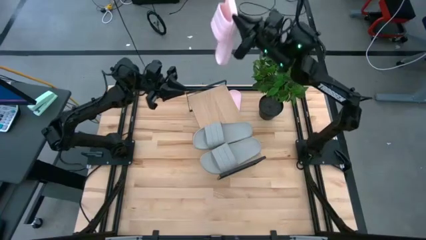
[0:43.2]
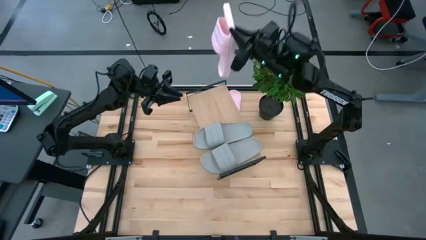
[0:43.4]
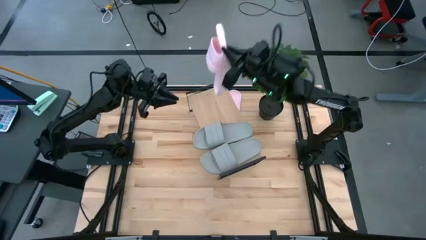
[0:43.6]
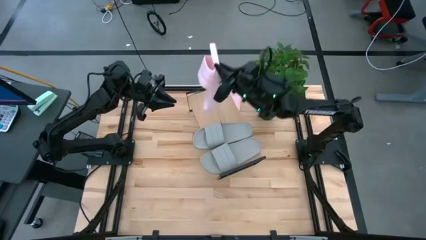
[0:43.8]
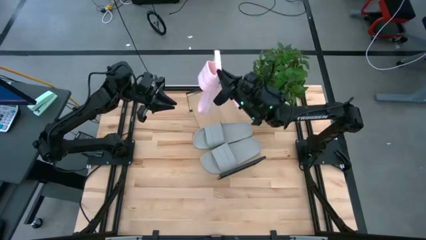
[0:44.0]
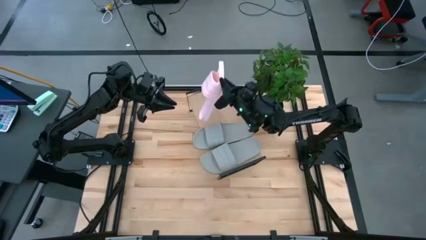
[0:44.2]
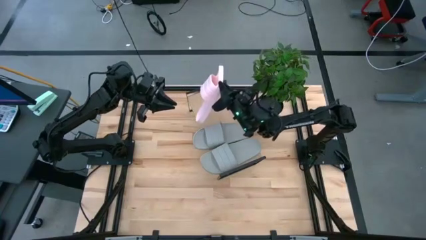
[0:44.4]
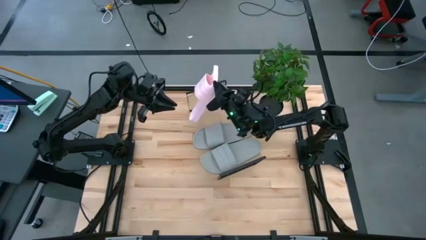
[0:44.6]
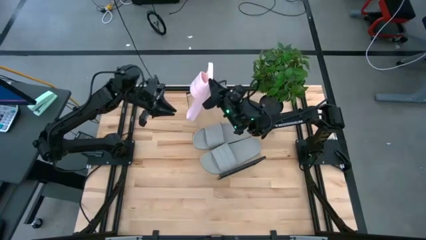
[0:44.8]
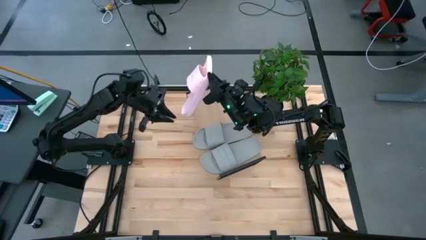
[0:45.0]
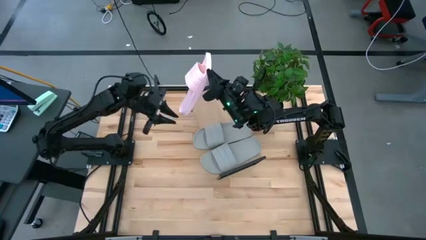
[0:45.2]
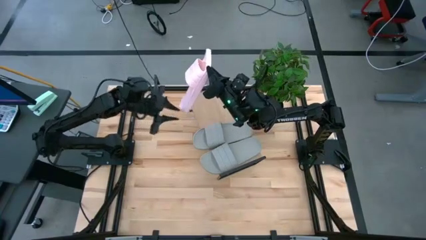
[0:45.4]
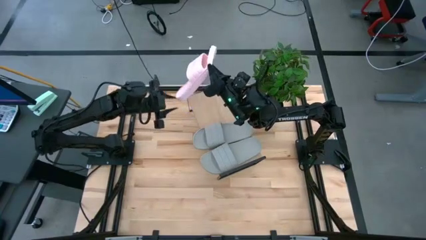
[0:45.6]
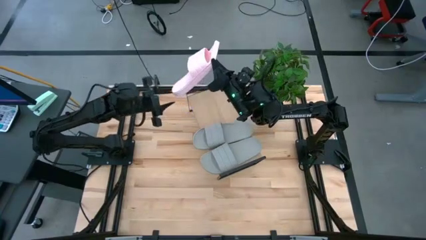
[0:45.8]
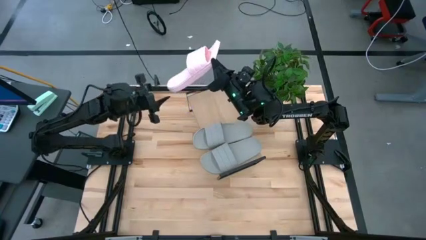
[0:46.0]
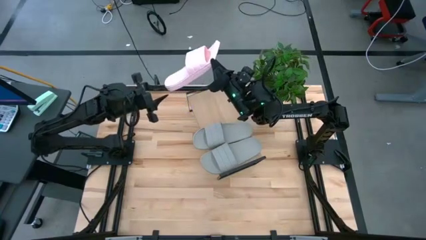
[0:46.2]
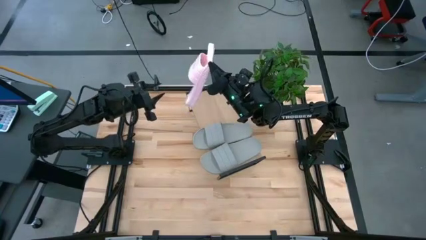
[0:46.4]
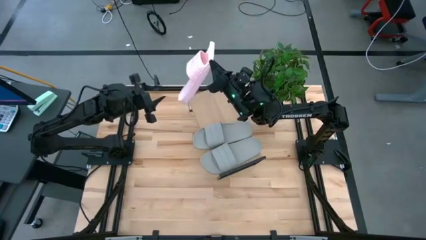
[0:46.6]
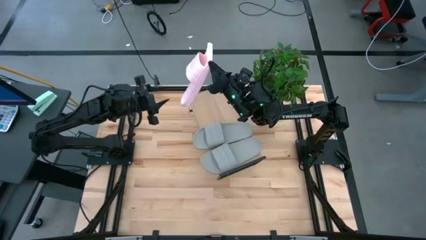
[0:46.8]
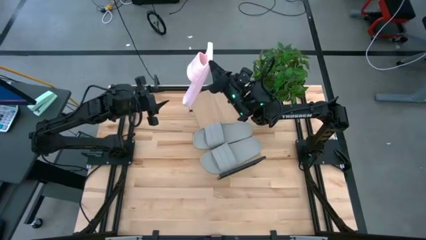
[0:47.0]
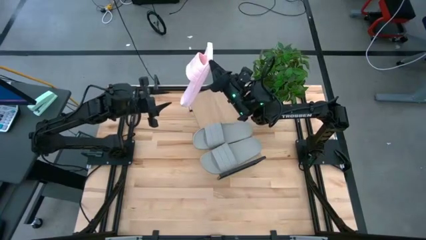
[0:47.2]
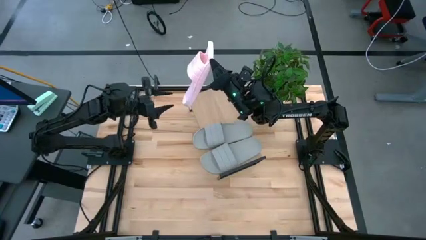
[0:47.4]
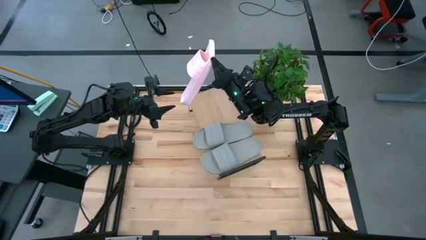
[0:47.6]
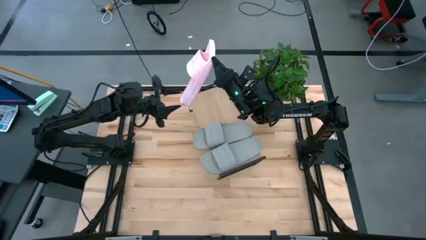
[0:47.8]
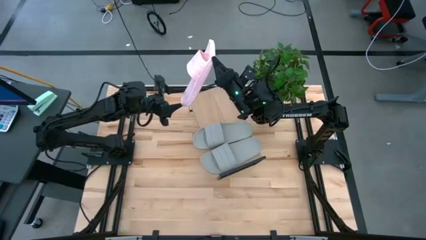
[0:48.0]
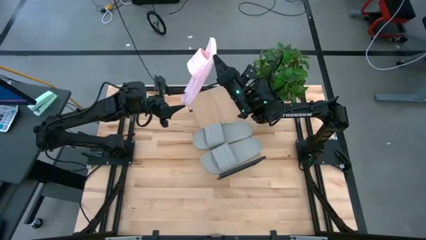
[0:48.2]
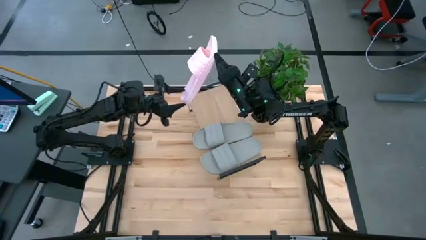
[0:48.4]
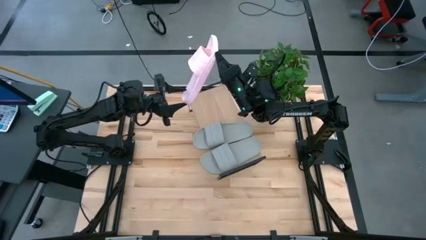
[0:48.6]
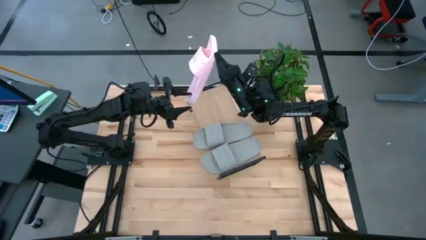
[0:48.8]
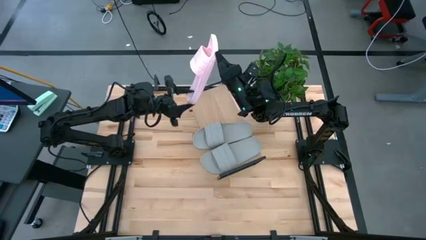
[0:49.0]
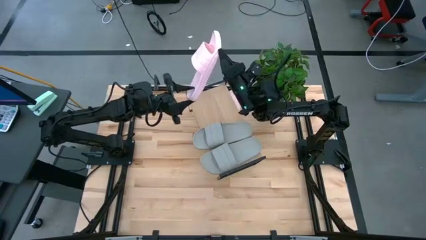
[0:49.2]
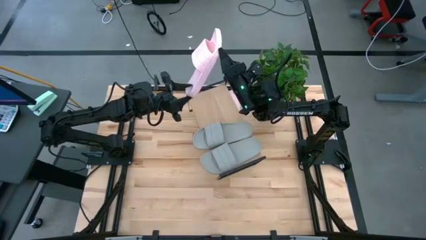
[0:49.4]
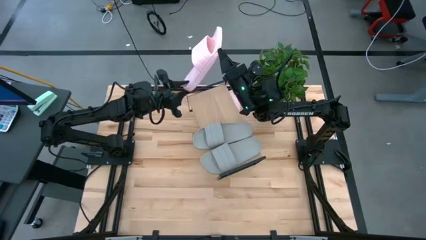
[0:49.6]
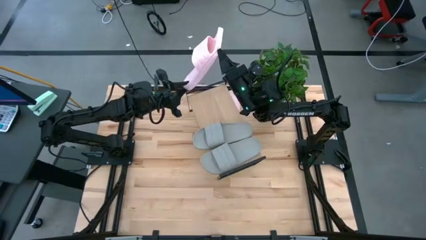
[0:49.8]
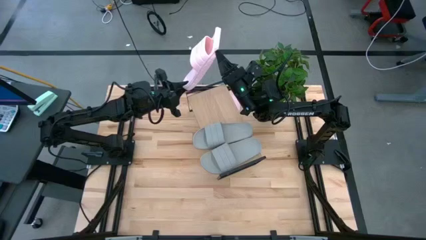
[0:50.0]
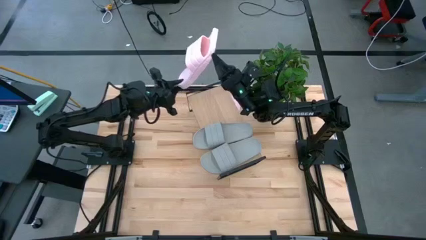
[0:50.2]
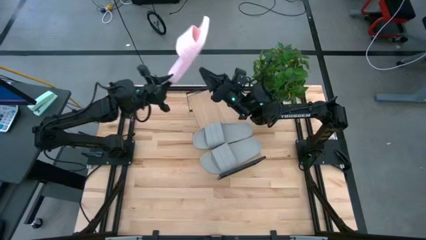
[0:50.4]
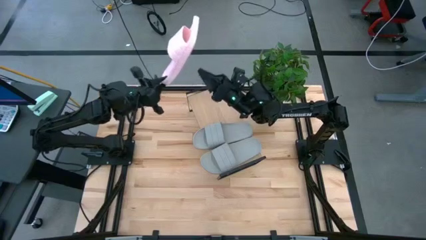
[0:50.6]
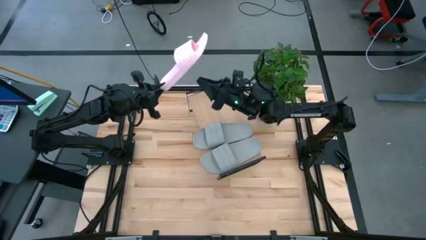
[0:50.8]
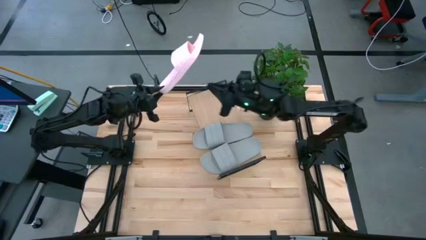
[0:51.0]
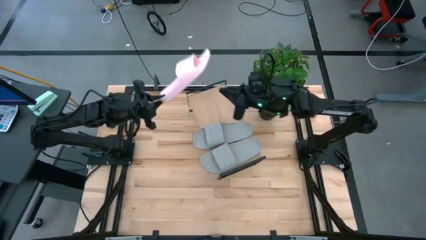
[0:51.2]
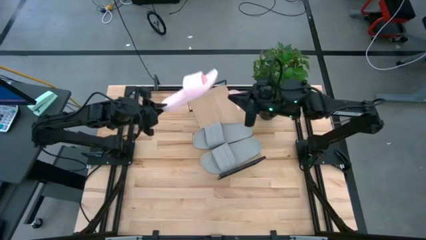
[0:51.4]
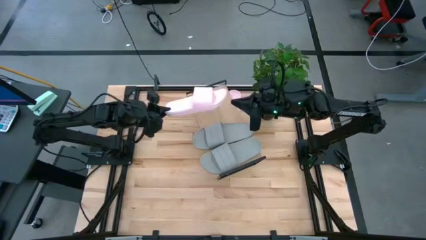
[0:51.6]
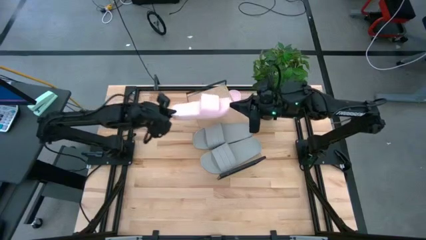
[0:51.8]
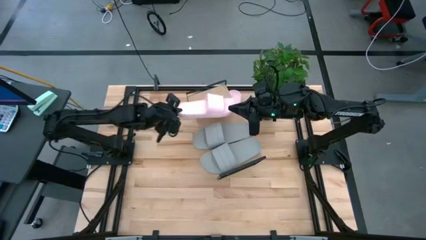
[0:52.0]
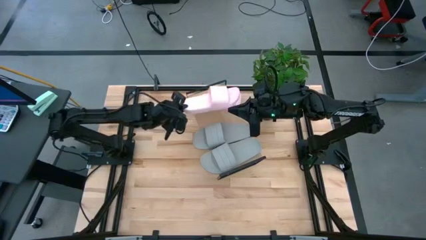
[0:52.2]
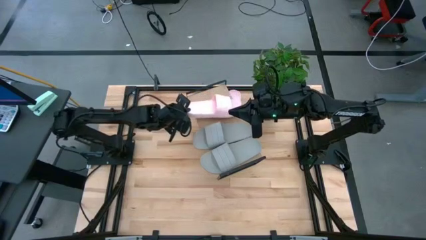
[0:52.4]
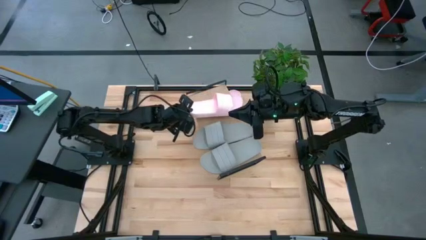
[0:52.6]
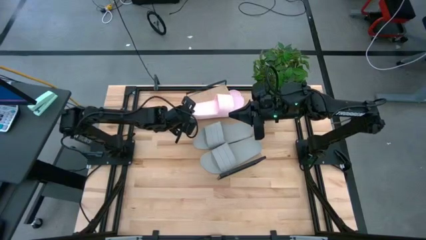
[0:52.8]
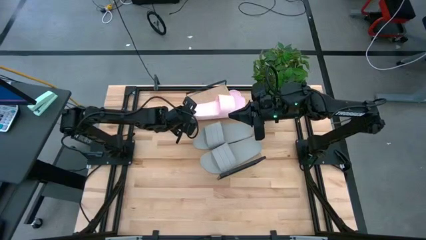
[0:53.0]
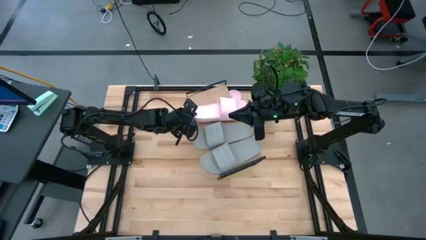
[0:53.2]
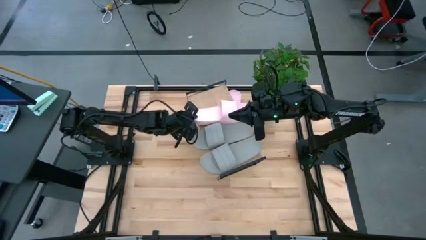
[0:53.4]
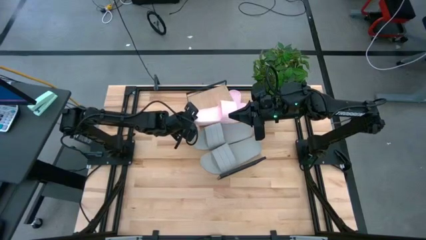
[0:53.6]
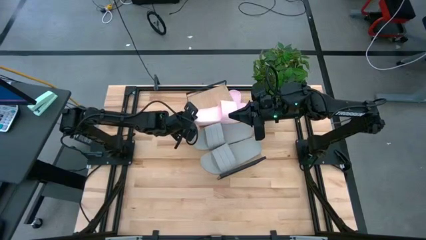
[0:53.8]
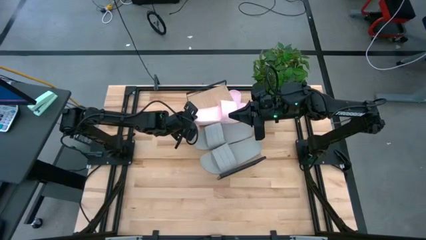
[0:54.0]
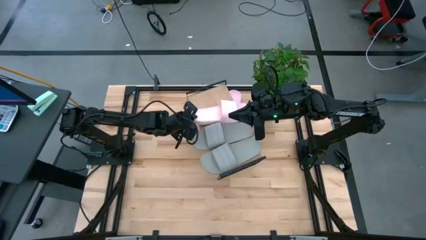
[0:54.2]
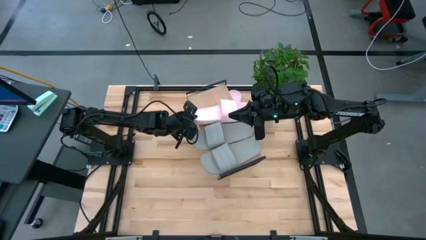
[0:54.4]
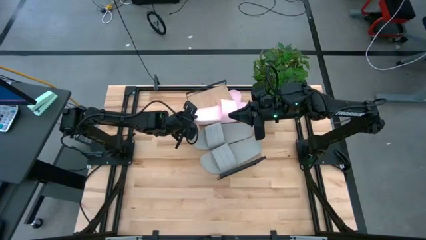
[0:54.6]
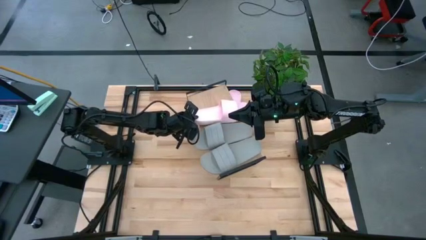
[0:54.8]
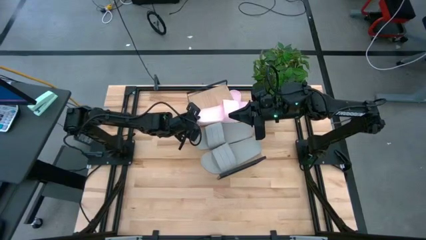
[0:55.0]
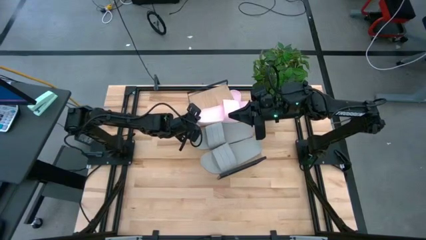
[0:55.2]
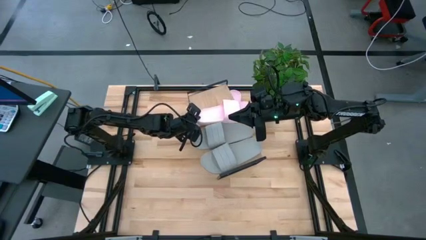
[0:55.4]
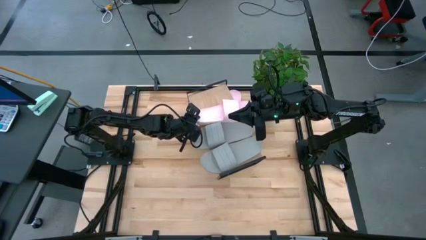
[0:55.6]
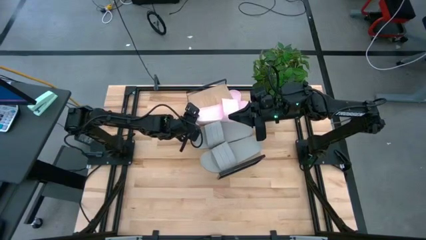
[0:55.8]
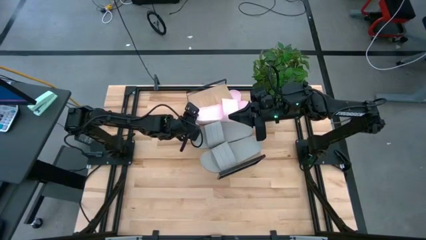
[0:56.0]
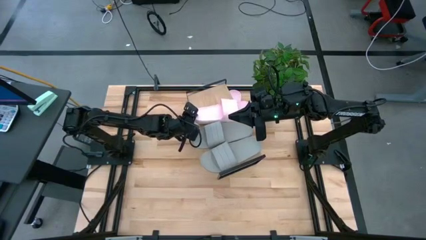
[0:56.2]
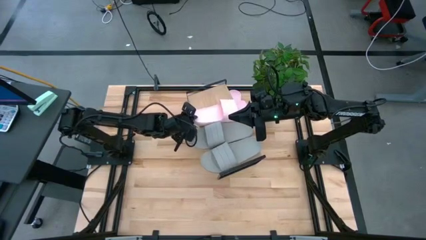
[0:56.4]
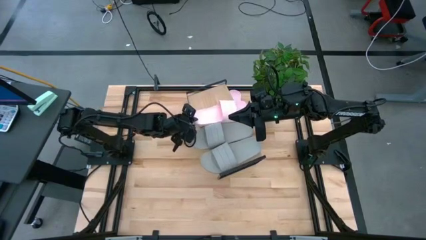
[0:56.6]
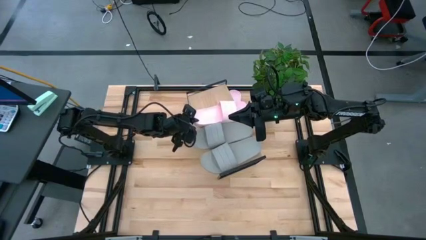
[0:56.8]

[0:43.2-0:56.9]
Task: Pick and place slides into the shelf
Put the top pink slipper on the shelf

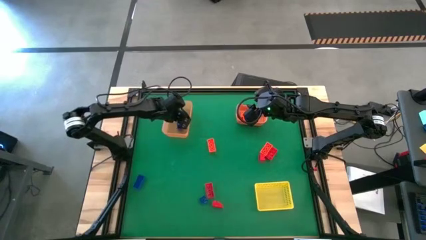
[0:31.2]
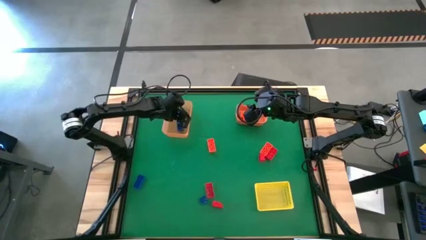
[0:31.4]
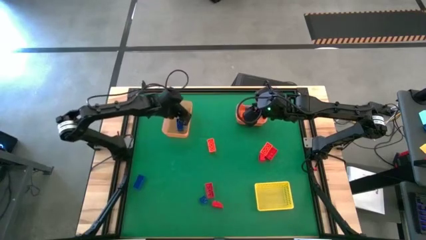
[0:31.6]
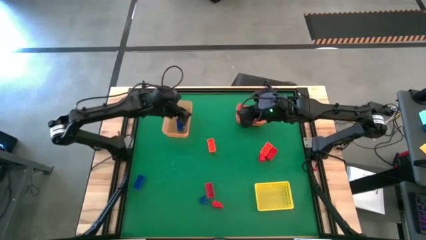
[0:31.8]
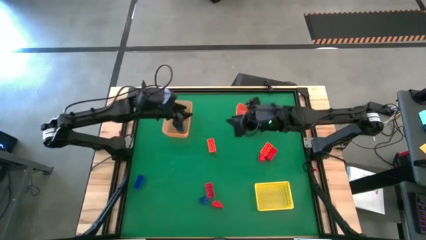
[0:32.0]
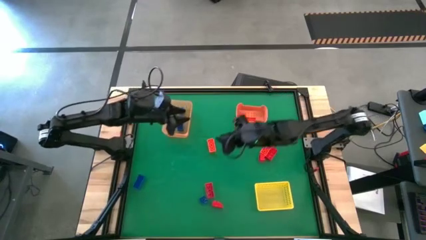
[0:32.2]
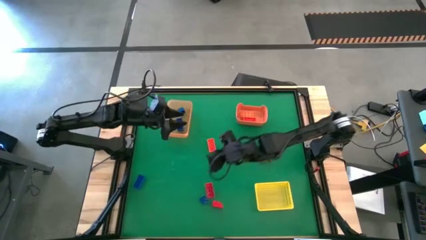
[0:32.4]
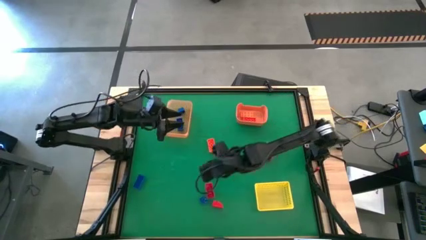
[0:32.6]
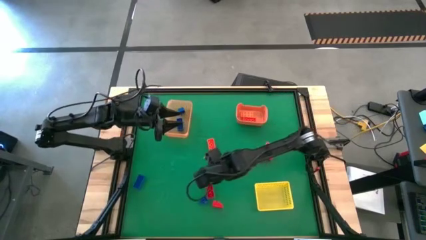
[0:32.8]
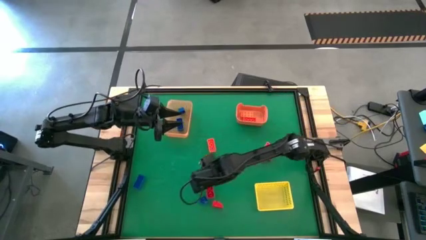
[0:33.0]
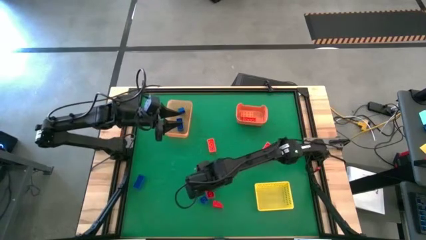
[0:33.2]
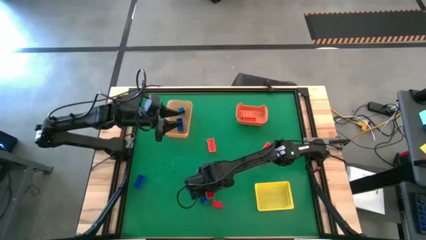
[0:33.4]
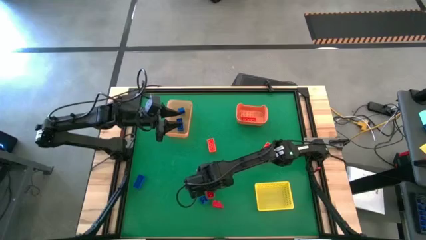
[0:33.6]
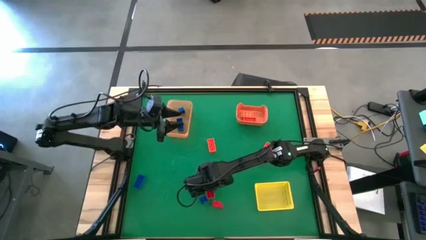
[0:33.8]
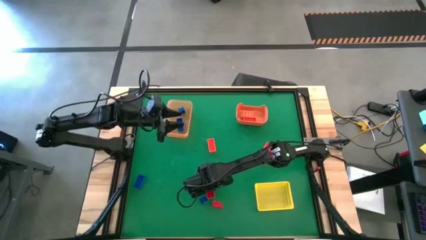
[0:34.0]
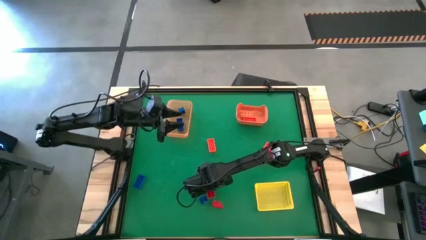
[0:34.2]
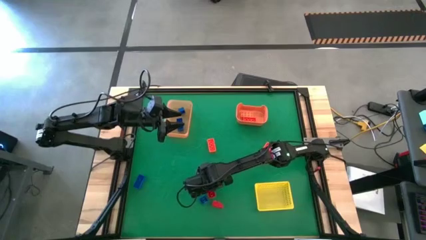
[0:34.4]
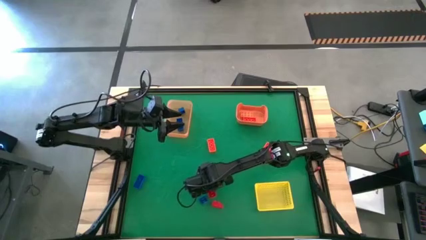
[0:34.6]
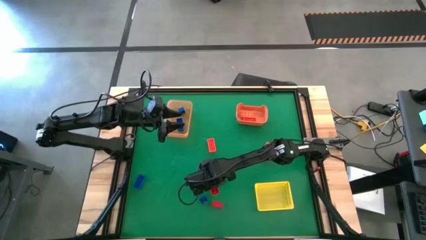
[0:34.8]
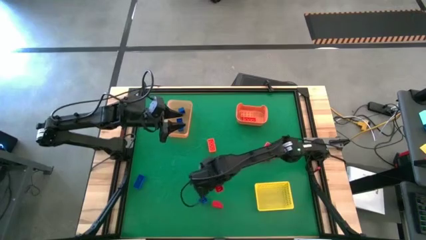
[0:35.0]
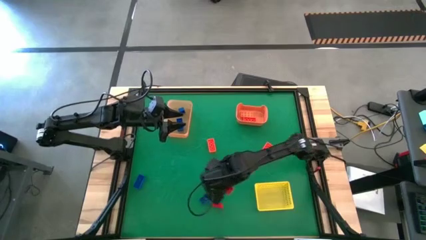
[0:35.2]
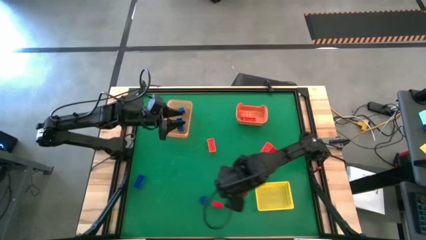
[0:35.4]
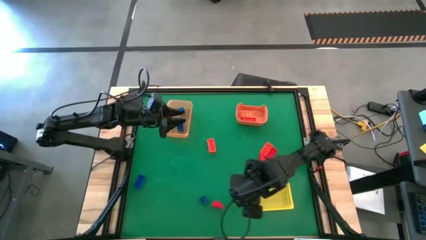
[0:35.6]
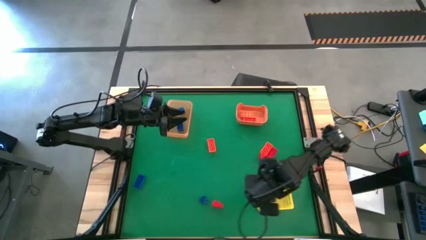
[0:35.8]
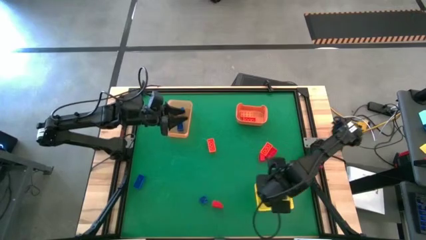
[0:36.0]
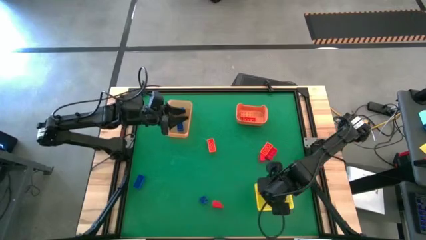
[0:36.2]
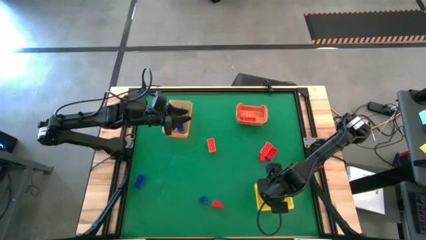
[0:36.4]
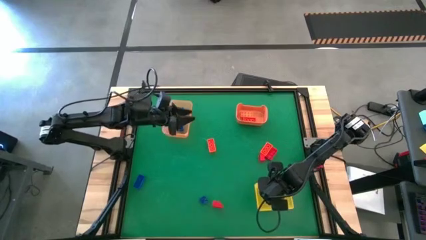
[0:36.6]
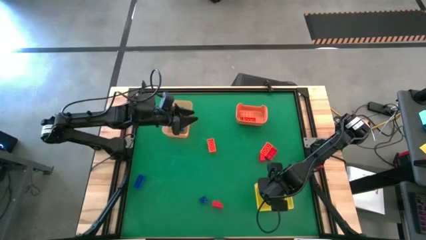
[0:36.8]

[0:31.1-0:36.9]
Task: Sort & place blocks by color
Put the red game piece into the yellow bin
